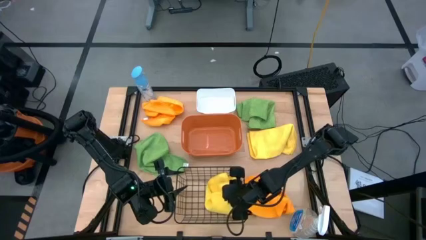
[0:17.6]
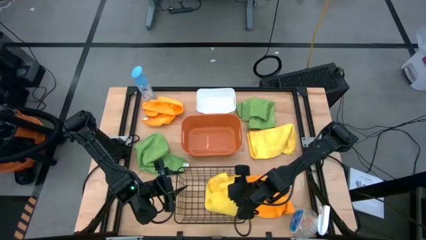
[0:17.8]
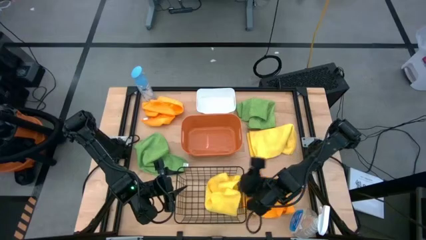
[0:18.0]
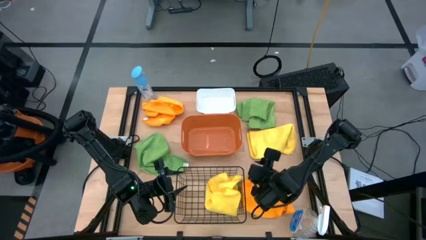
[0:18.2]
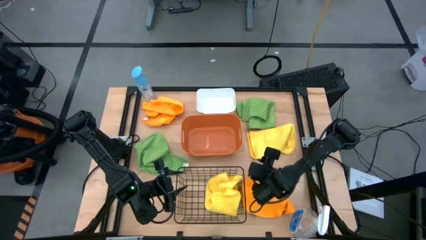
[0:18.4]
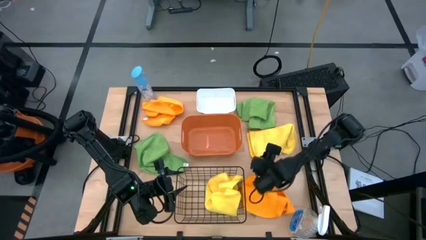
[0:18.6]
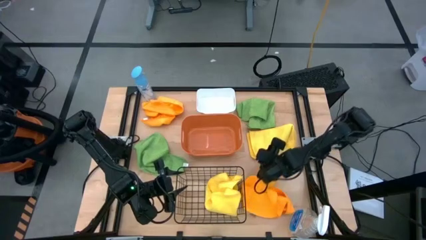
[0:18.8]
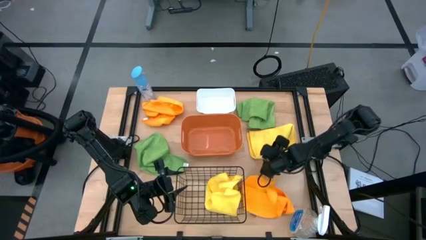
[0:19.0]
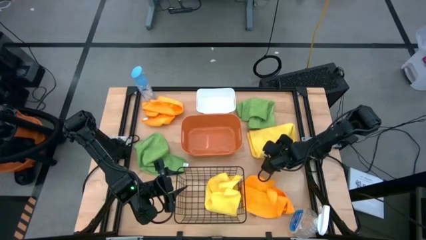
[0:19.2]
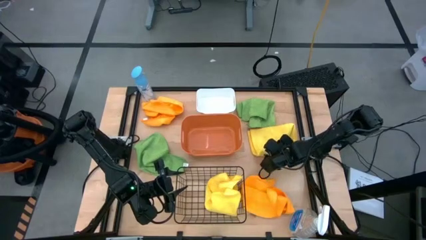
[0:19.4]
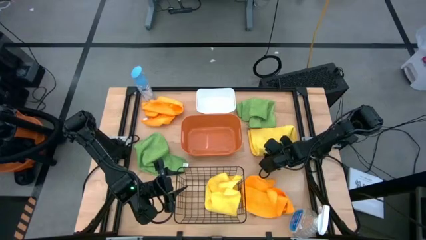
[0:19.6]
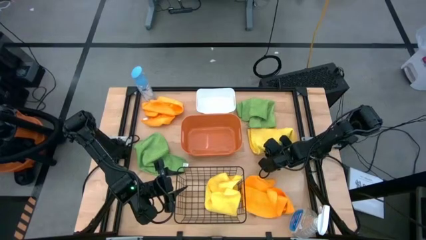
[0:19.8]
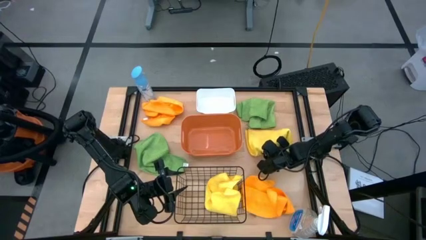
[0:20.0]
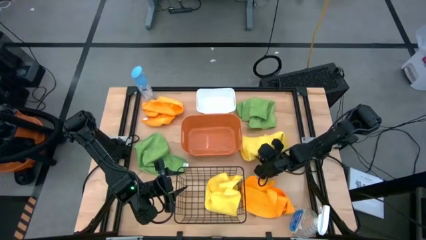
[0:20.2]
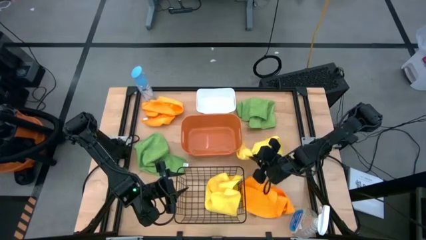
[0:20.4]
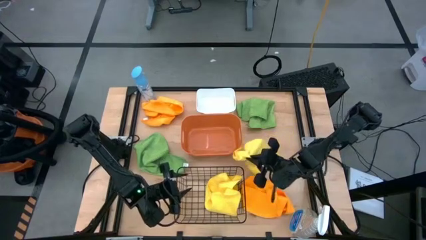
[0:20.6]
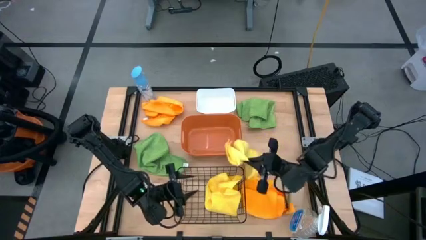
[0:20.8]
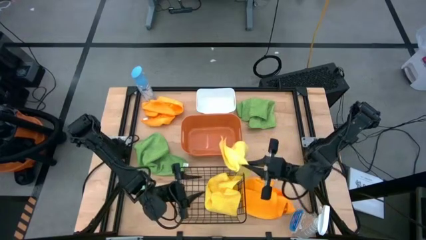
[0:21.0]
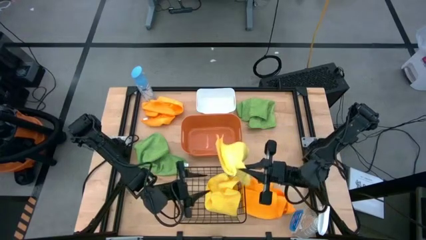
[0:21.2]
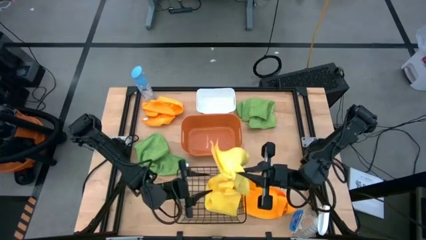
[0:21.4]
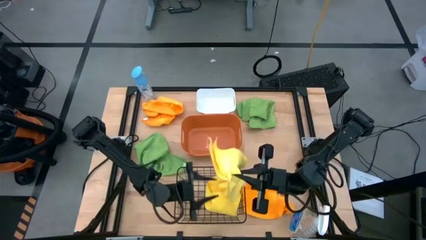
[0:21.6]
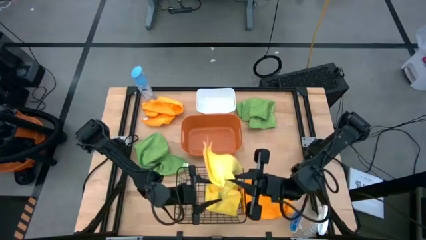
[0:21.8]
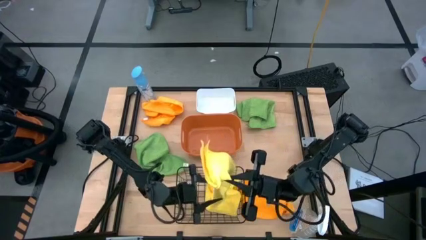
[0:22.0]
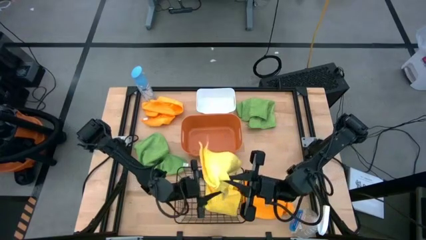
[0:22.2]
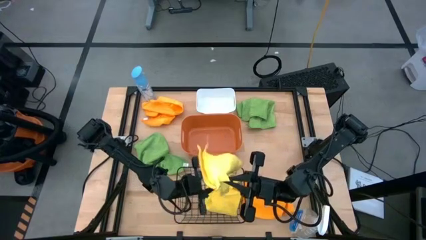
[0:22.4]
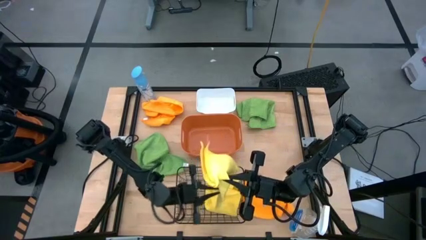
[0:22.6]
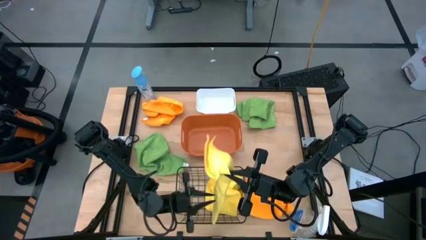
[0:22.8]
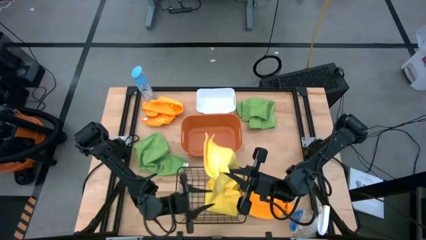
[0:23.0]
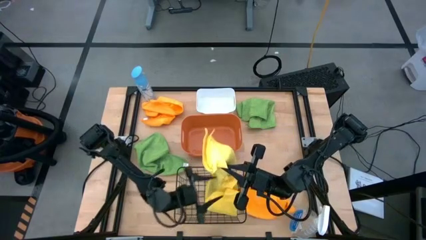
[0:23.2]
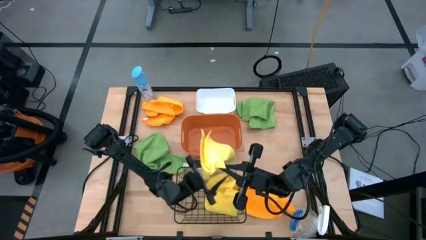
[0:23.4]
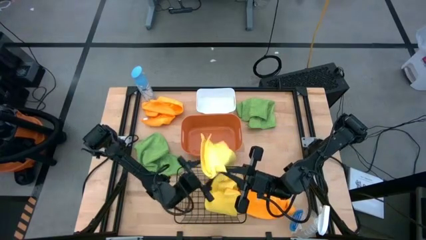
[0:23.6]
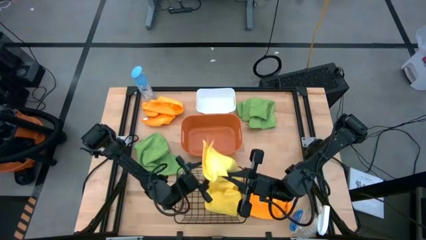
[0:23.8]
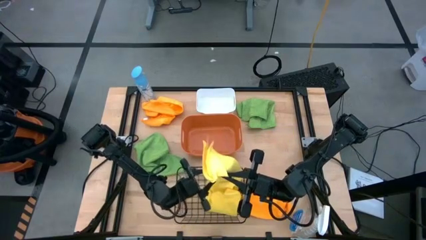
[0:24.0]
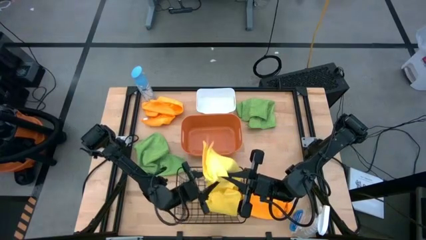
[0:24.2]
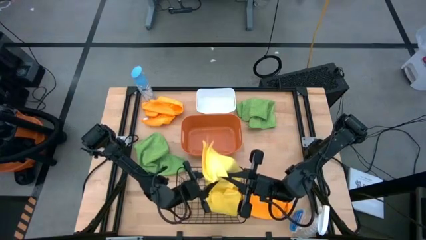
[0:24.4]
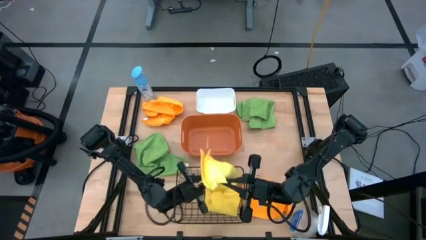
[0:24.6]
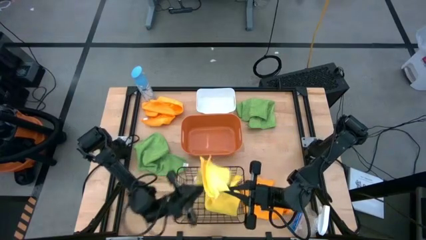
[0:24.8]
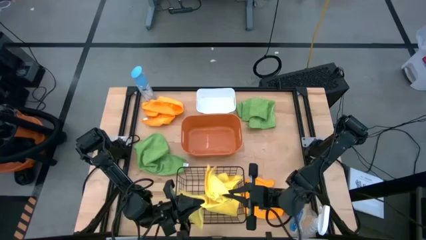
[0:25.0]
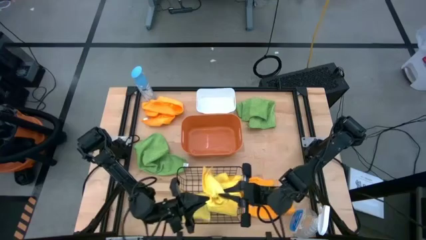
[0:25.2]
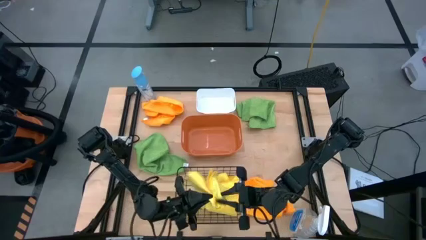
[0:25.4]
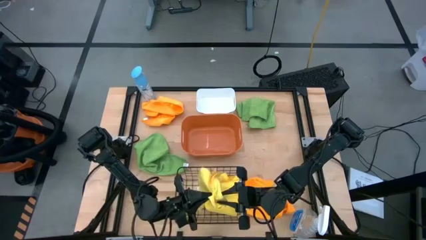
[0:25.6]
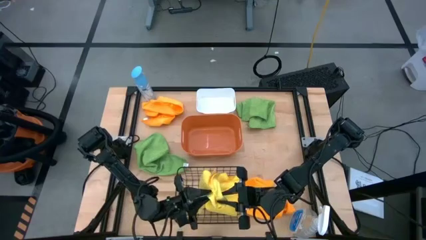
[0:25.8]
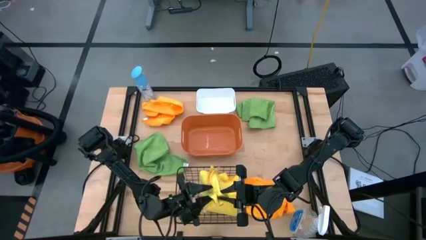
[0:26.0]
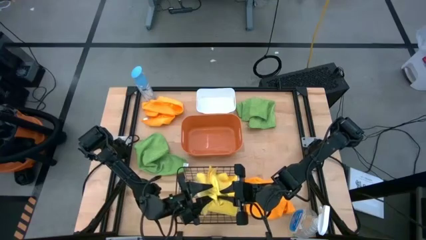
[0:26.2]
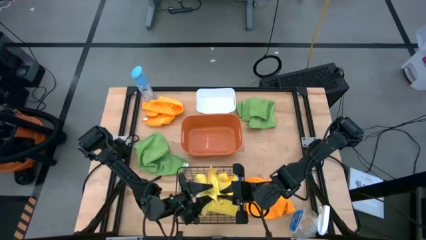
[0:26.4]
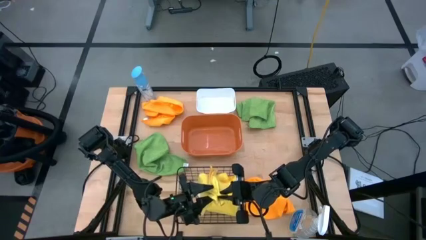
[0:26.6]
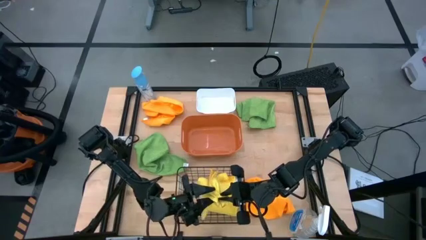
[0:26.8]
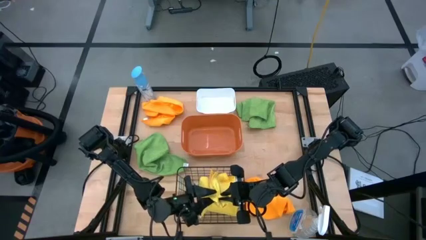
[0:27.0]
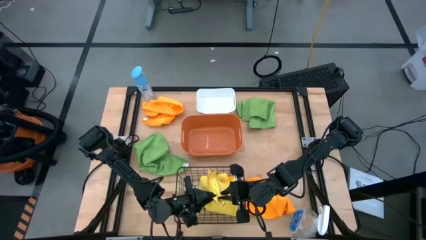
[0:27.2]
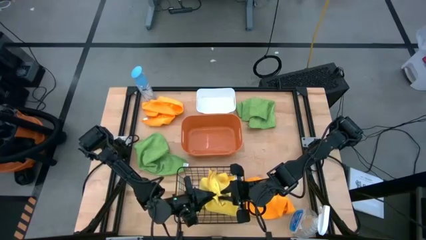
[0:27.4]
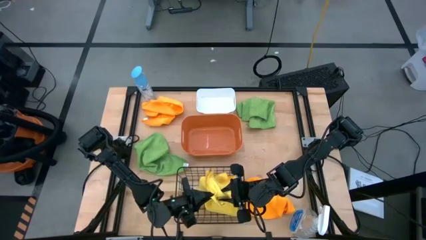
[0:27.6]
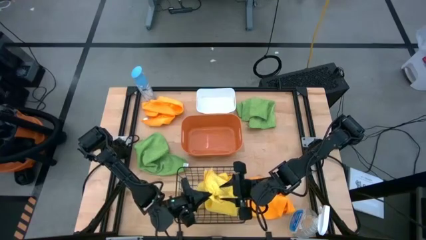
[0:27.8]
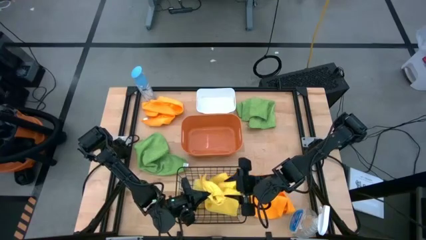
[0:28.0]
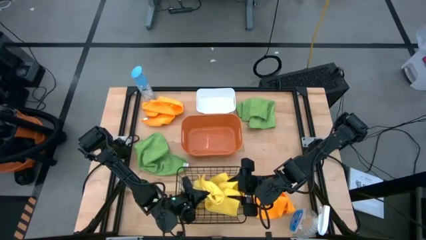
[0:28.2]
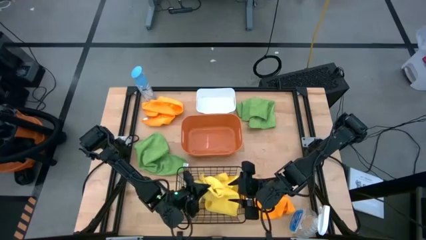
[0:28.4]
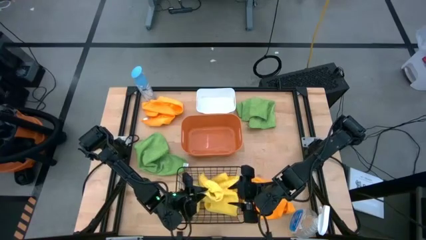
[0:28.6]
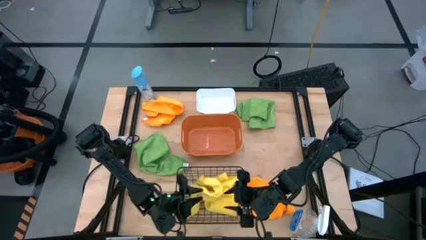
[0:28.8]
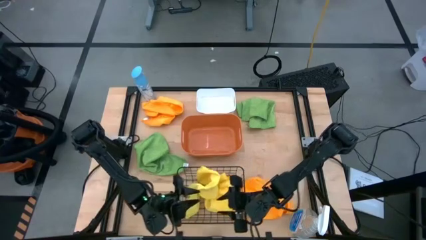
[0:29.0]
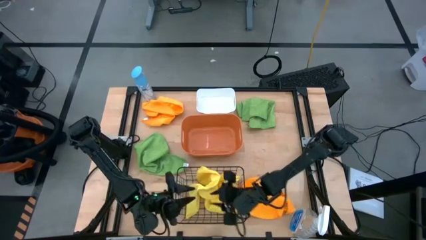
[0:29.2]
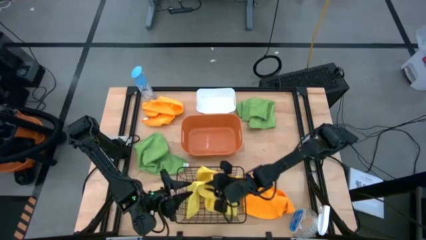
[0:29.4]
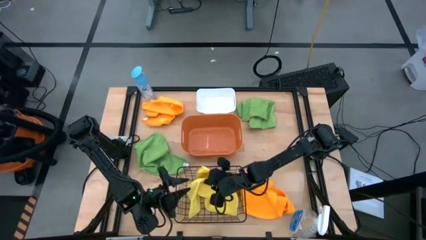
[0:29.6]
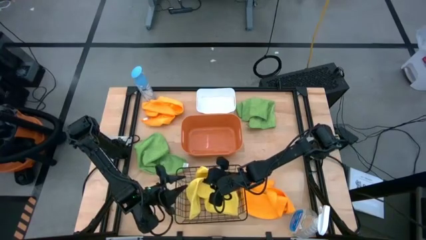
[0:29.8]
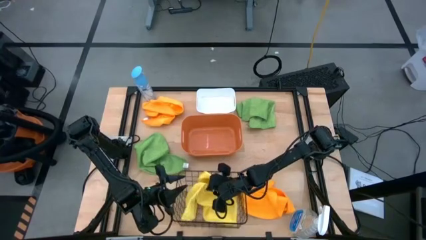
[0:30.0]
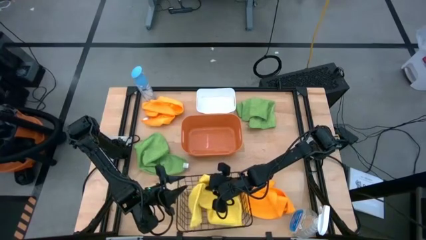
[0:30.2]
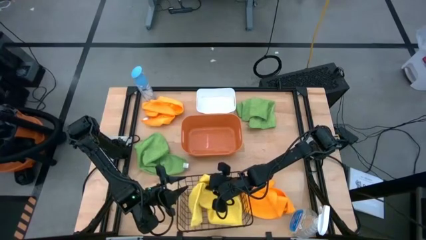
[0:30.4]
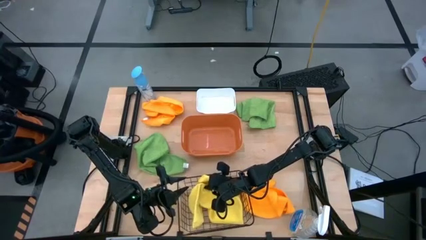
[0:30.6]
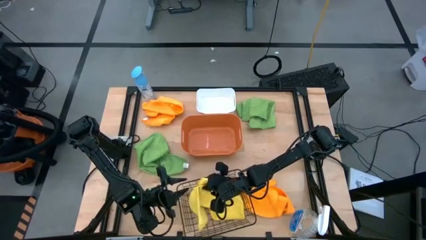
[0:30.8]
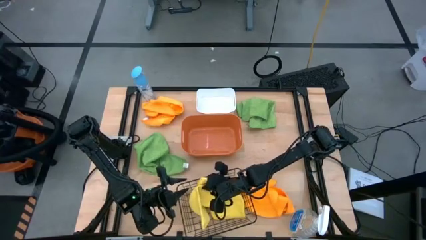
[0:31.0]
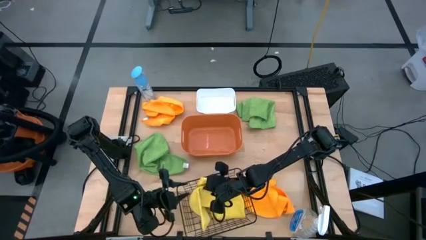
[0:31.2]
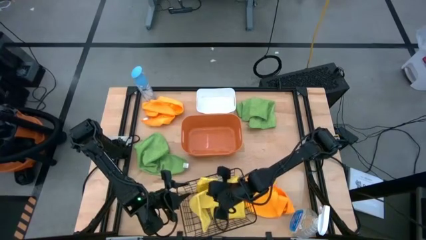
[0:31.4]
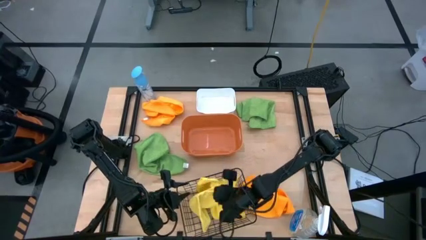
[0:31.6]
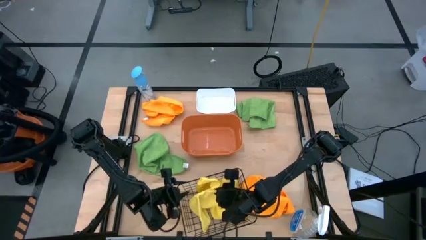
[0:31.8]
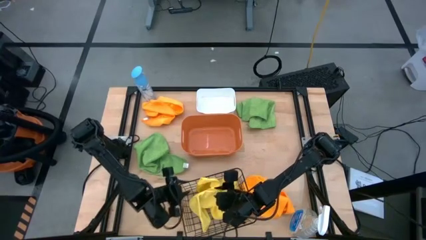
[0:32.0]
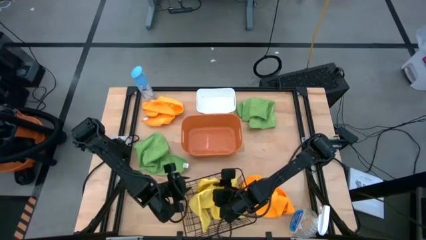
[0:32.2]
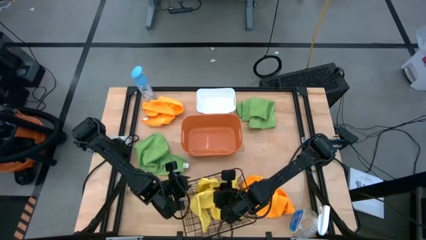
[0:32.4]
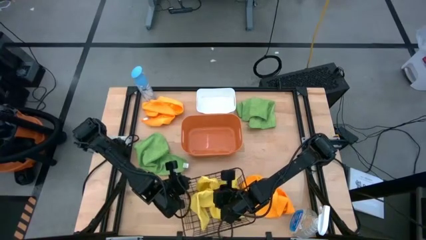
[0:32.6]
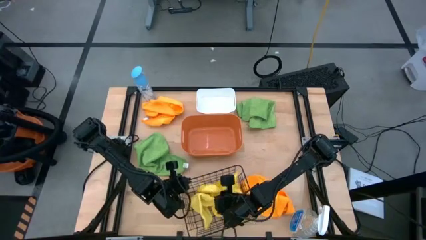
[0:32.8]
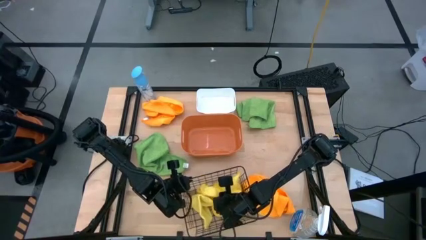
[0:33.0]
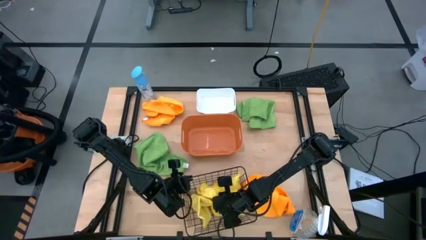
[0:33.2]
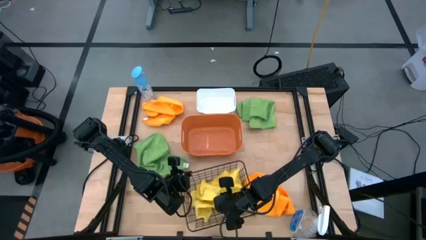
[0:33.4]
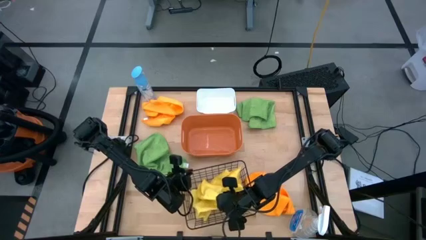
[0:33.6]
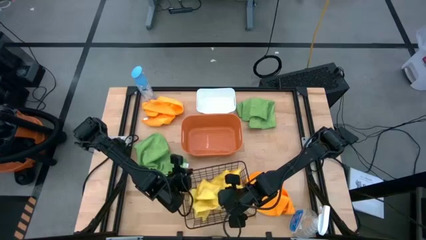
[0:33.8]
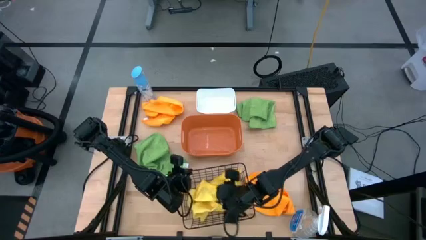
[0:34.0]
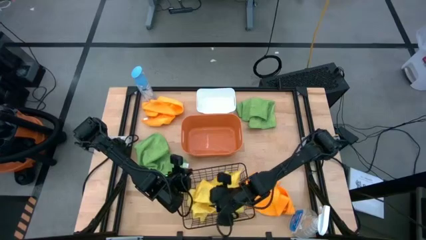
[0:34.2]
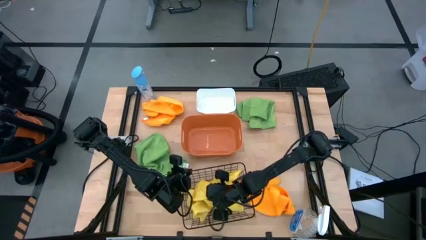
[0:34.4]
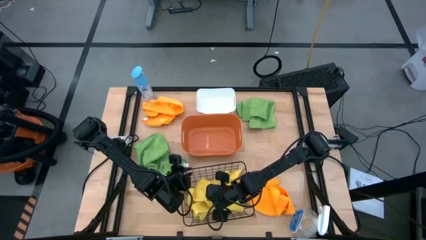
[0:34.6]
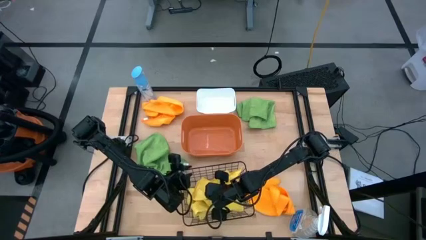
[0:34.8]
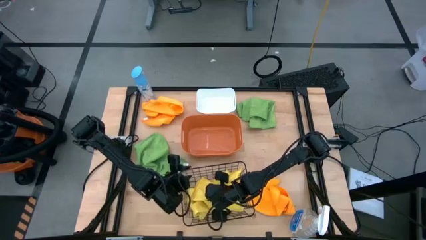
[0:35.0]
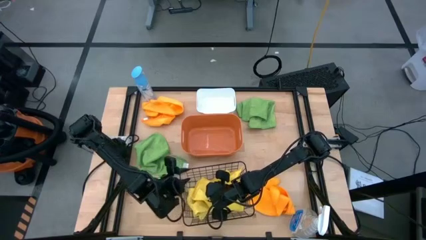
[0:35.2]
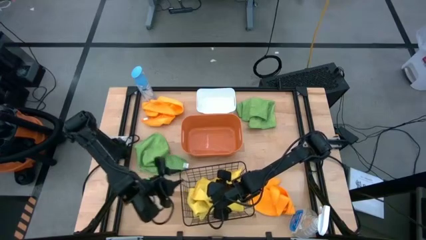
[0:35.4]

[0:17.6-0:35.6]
Task: Sort microfiber towel by color & place in baskets
Put the yellow microfiber cloth into the black wire basket
